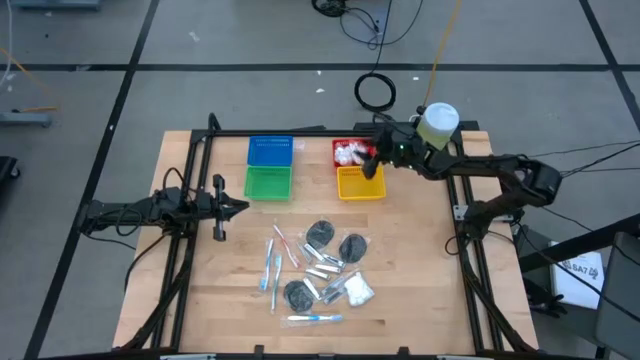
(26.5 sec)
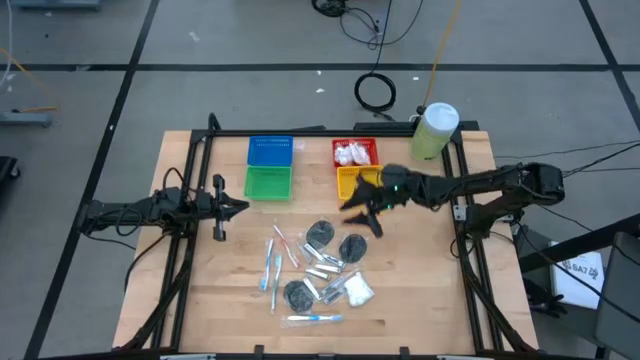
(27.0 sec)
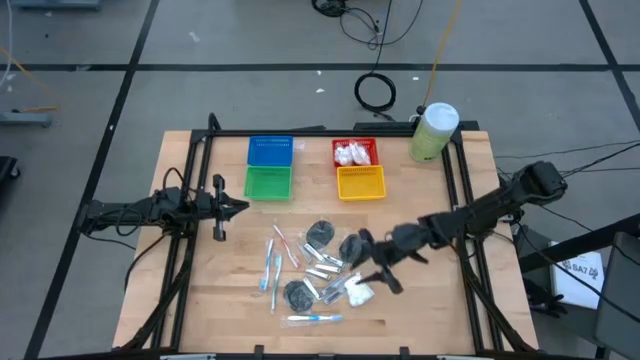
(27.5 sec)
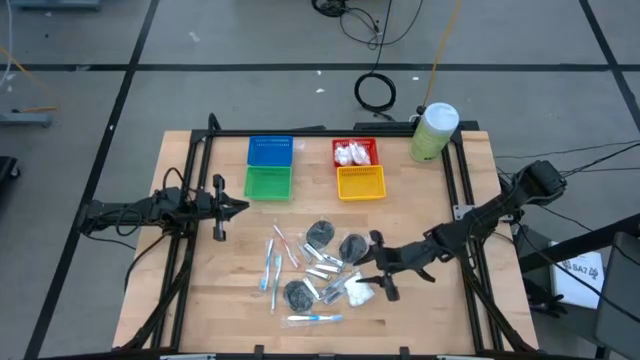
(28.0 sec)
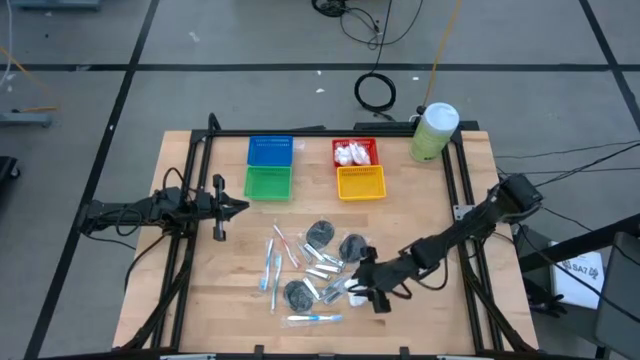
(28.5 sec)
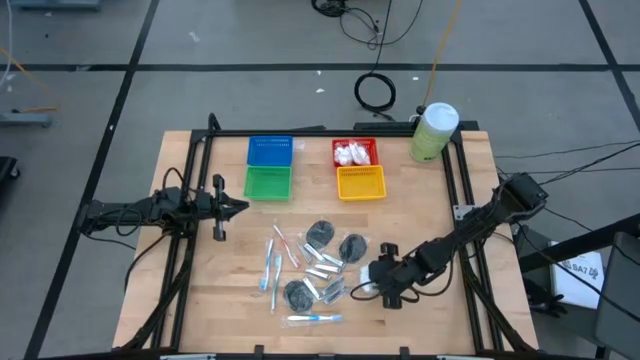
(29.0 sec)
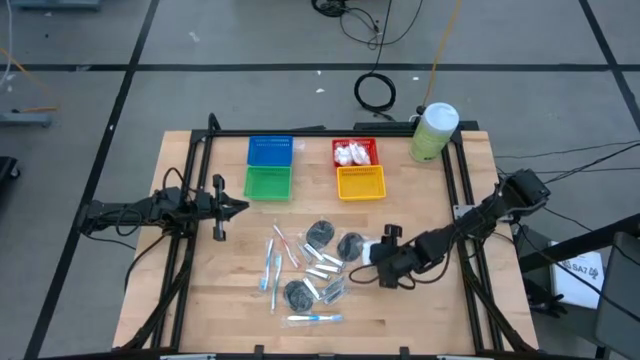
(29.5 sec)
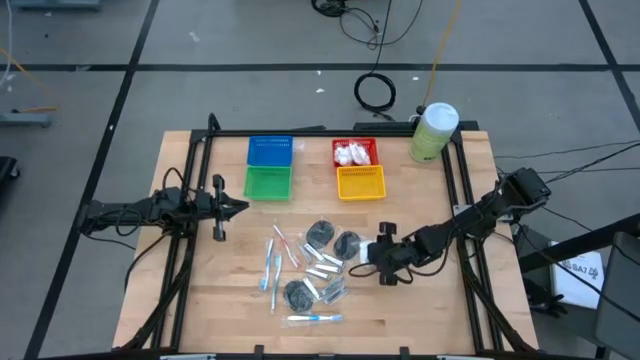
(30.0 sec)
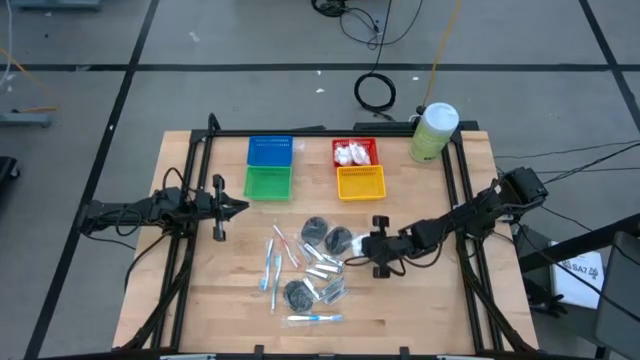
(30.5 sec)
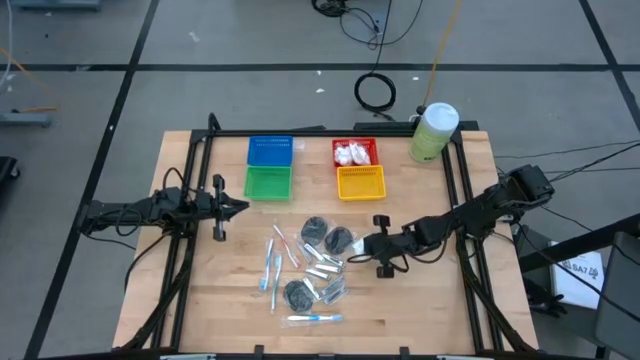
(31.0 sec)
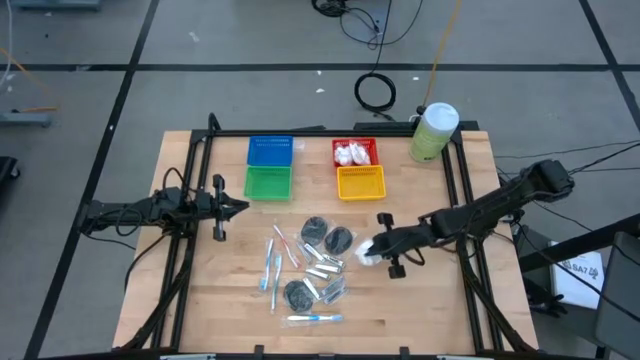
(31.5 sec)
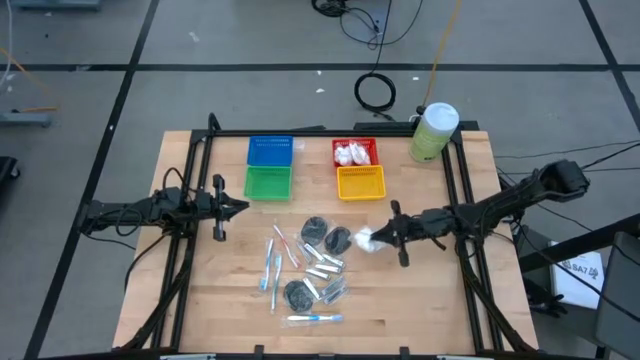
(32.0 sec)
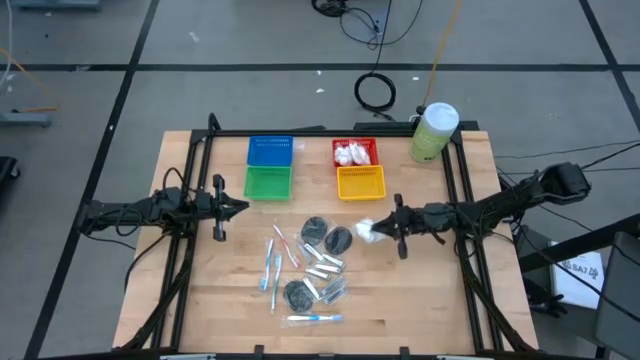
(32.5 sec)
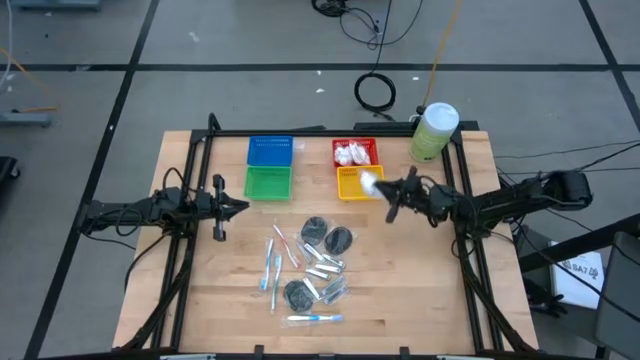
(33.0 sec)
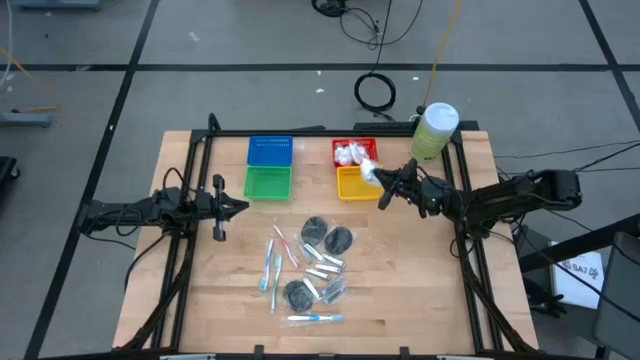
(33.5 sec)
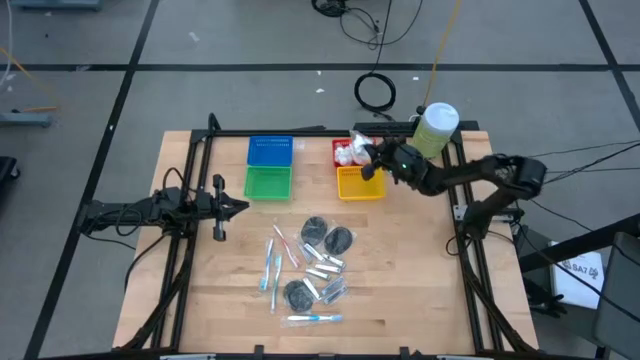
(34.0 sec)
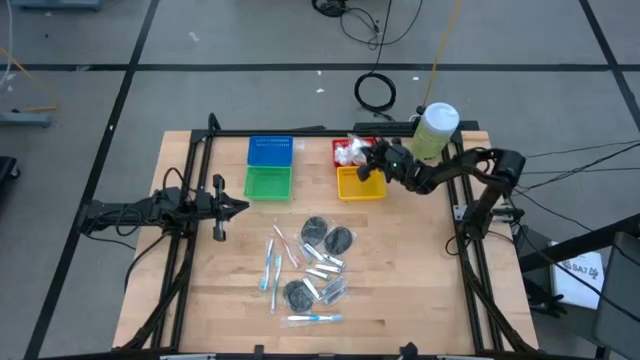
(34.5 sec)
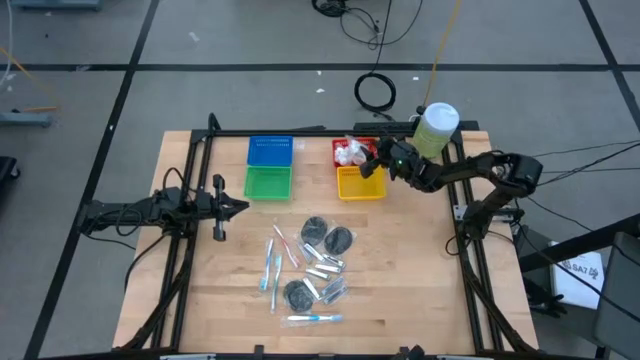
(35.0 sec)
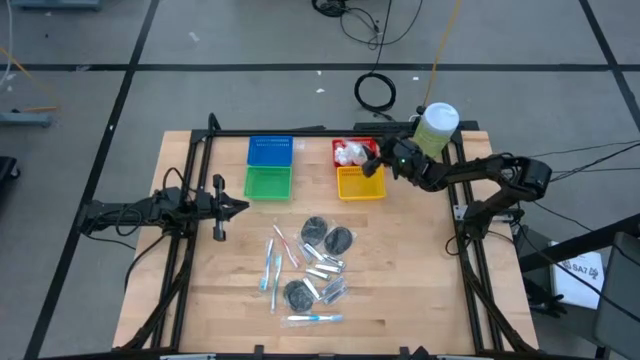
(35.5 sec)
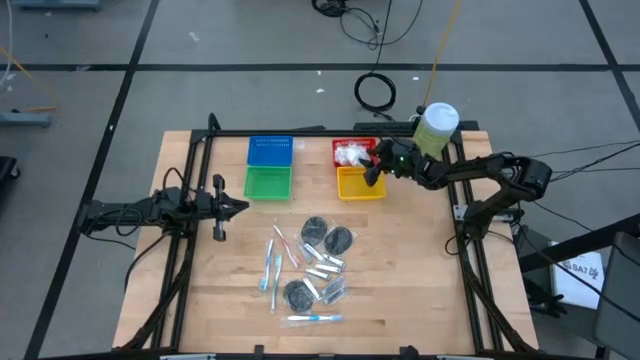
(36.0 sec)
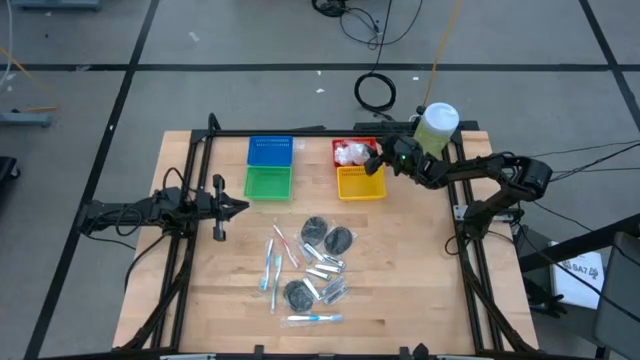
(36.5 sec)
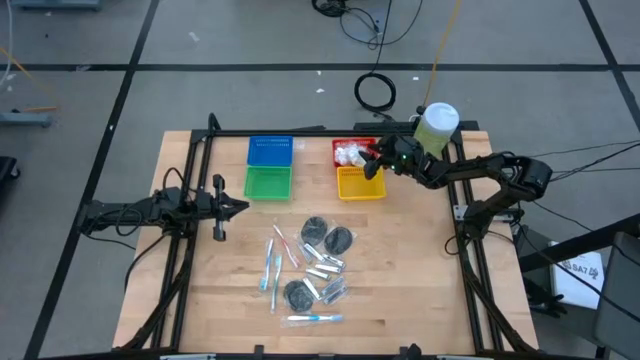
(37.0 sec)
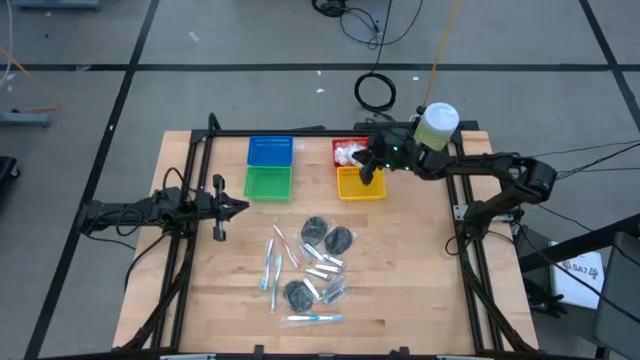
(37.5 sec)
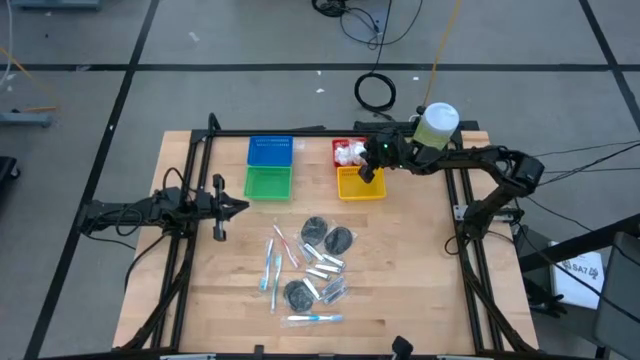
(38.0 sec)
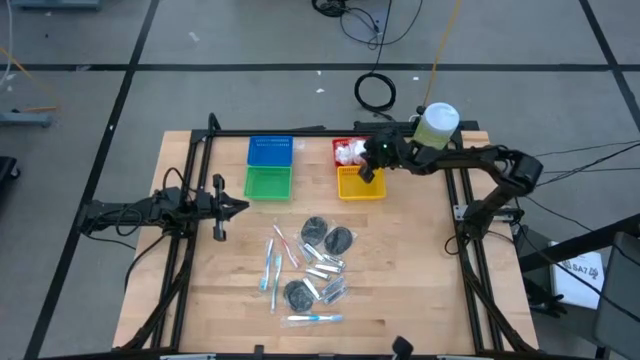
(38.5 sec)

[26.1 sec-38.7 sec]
Task: Pick & Place Travel size toiletries
Put the cotton pack into the red bin

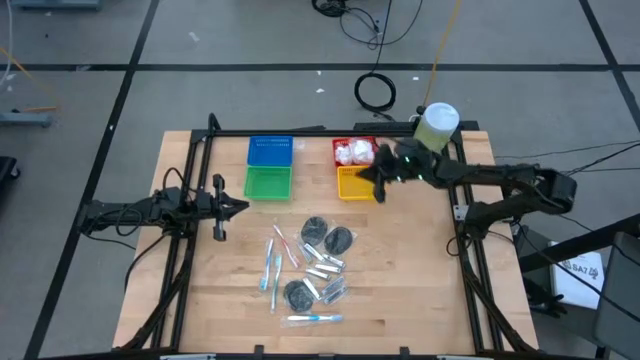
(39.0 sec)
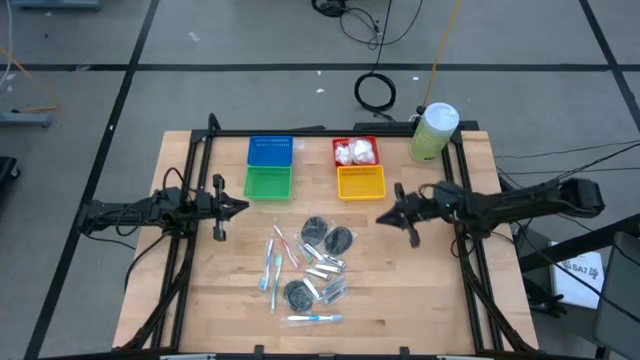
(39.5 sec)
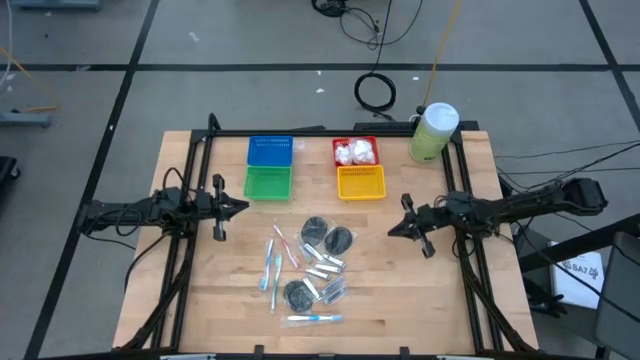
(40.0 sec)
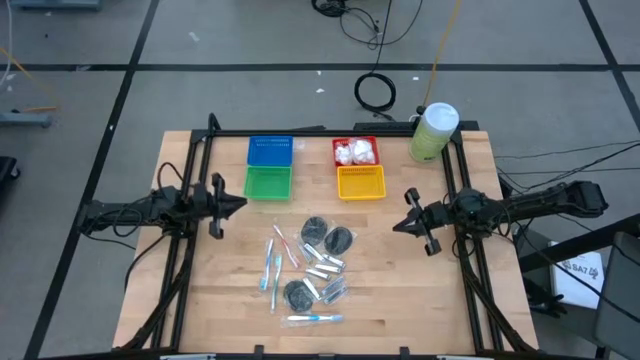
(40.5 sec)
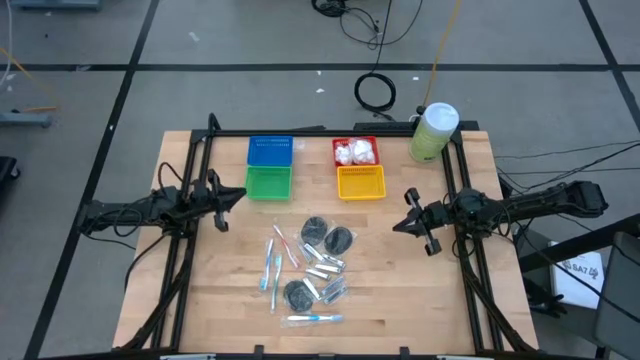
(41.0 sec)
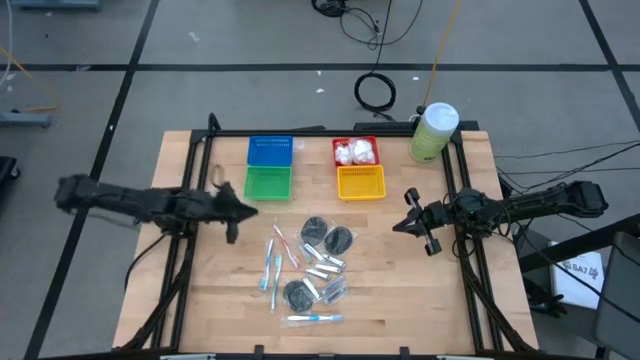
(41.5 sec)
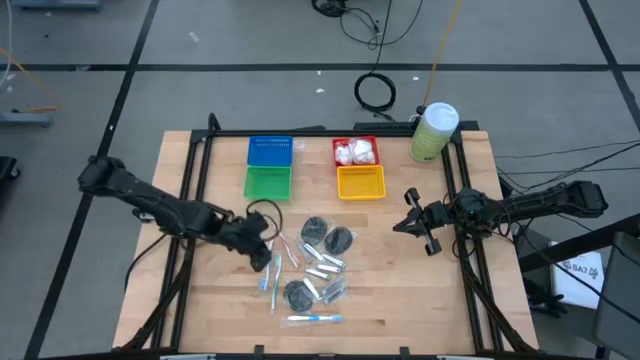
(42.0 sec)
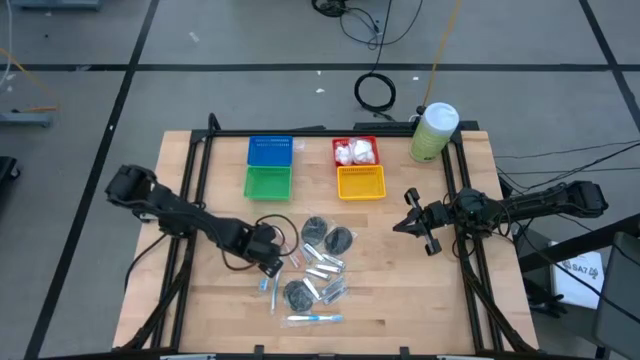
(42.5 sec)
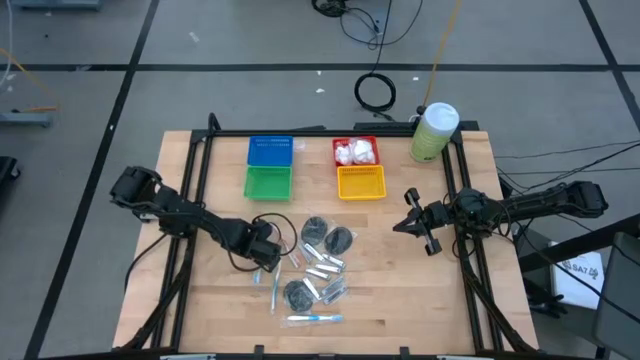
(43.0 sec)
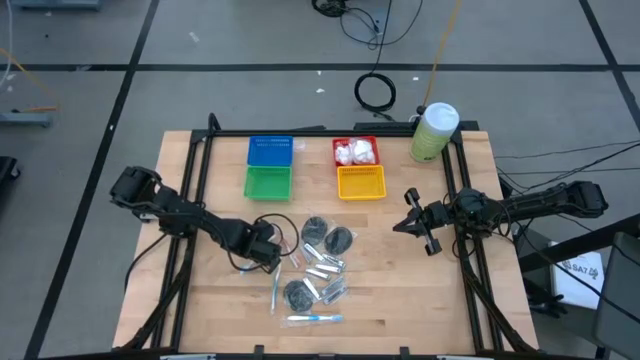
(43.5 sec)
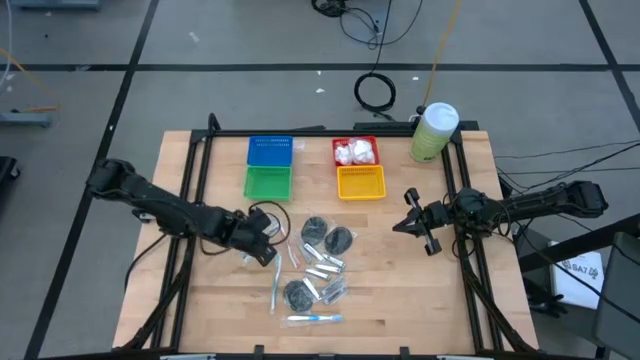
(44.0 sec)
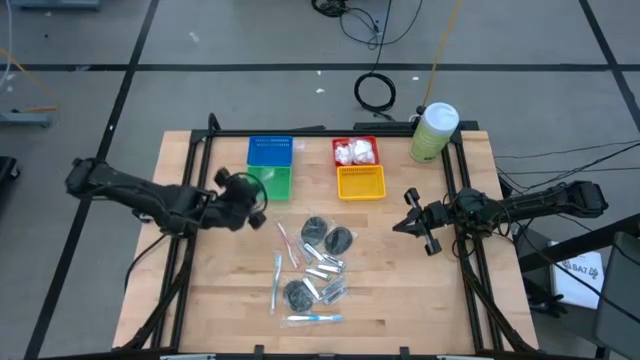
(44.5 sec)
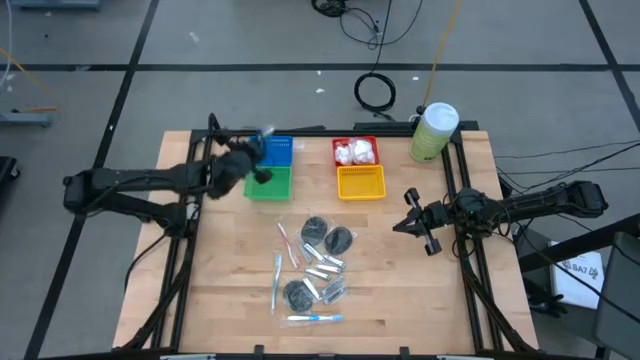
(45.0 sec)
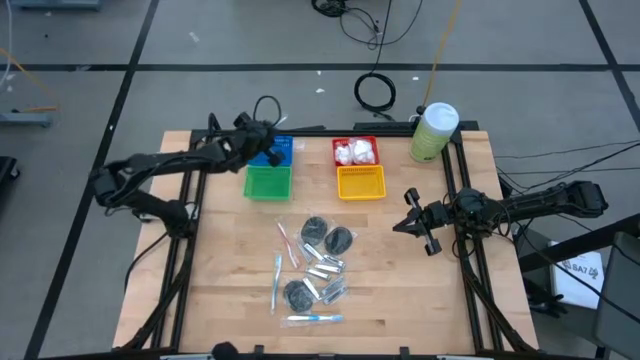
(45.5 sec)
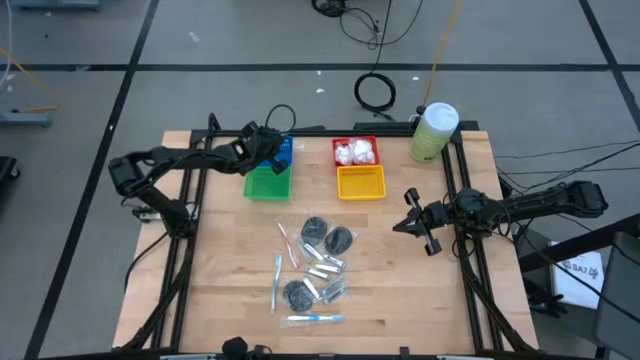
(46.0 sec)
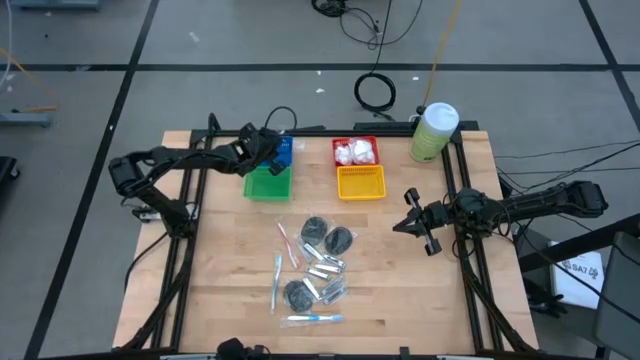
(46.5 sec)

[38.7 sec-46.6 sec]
Put the blue toothbrush into the blue bin
